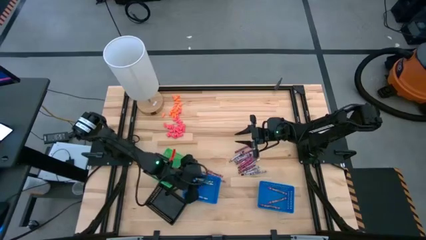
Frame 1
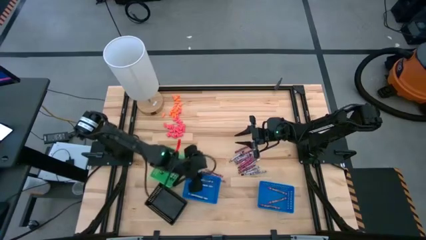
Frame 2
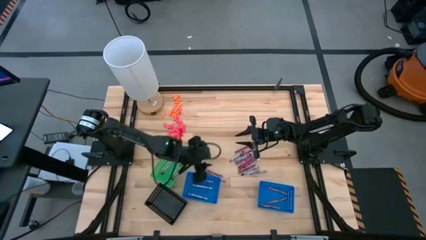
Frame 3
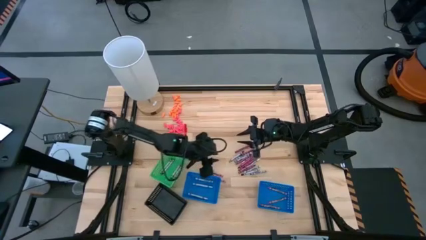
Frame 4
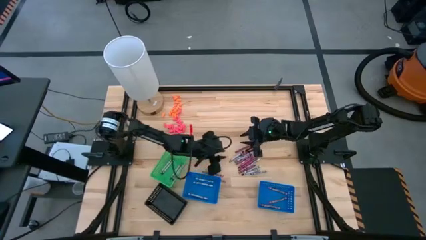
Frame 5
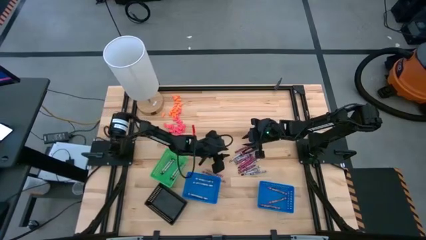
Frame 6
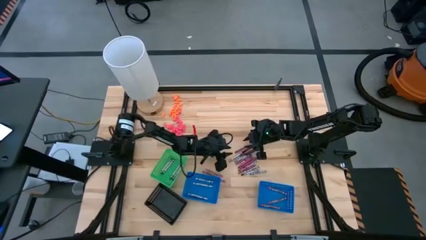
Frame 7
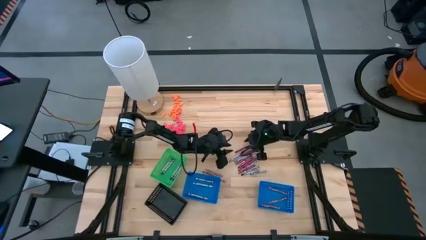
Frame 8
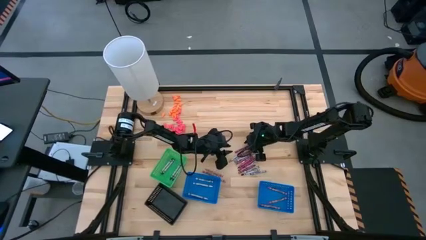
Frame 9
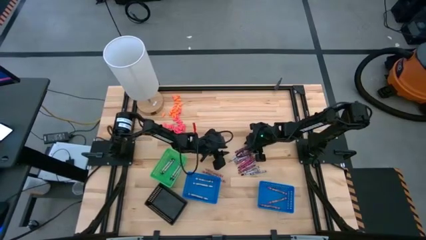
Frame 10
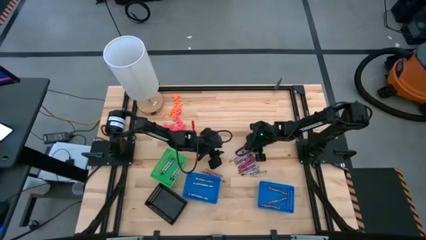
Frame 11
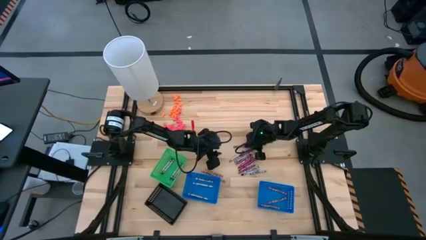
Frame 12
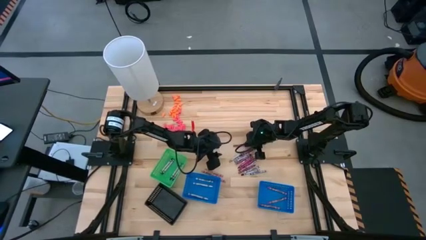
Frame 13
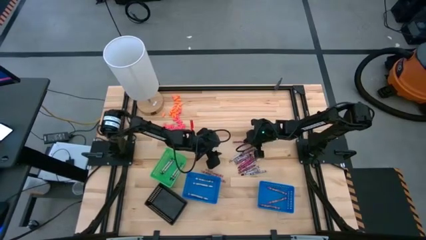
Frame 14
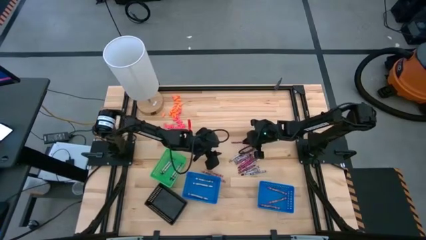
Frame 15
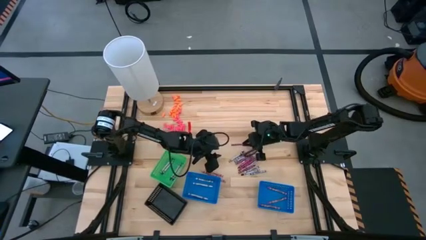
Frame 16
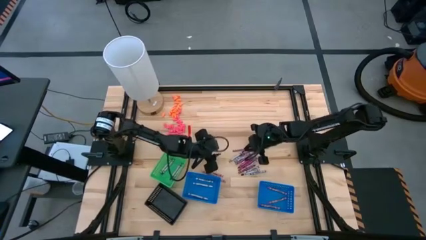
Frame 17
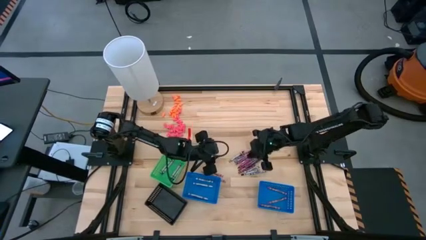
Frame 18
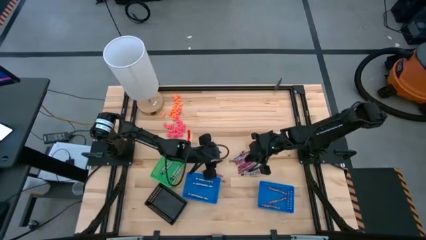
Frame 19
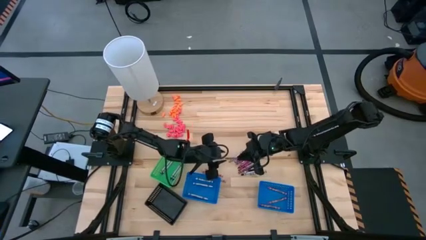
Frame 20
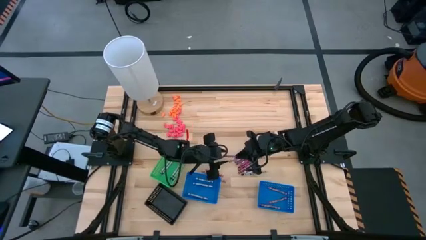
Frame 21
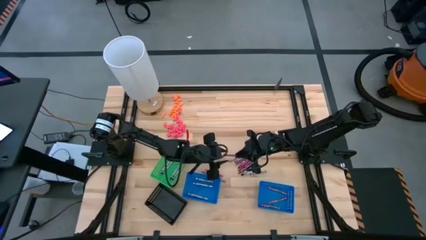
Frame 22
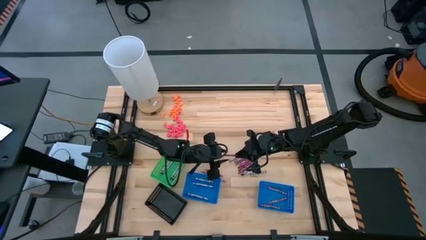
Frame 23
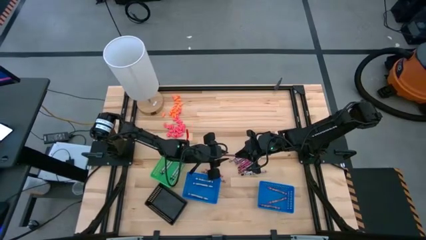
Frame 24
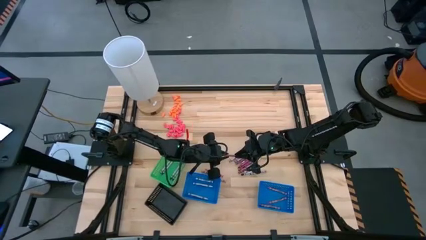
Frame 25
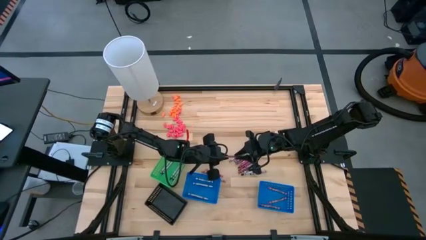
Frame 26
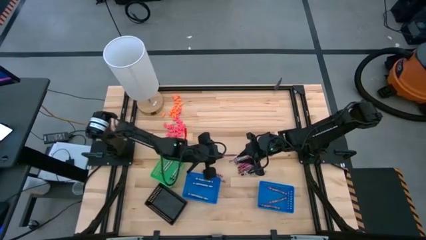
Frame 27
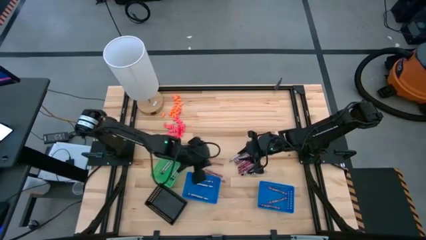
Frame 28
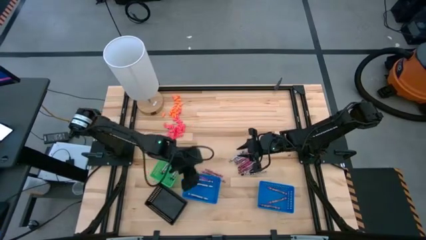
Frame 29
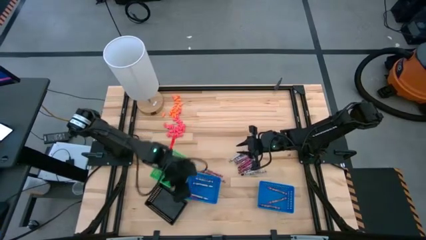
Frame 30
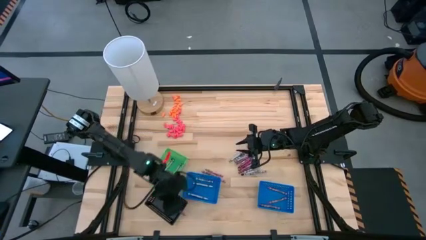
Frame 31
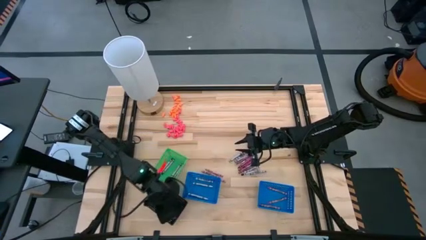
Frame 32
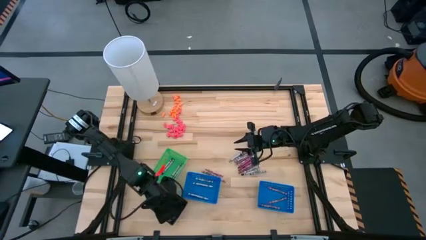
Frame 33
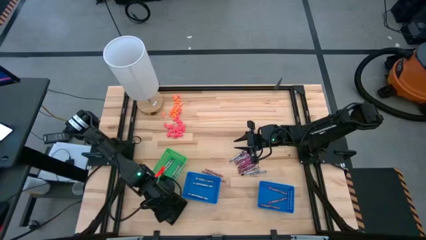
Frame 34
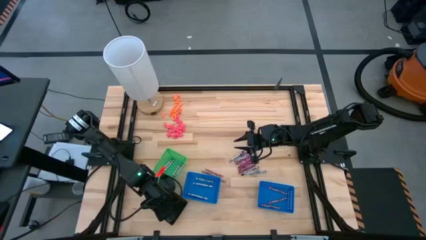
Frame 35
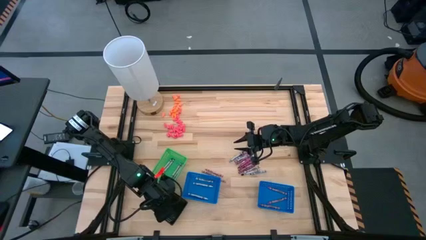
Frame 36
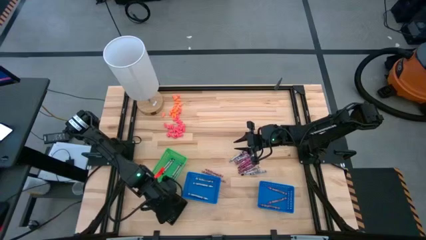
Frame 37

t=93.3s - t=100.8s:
Task: Sort crayons
Put the red crayon into the black basket

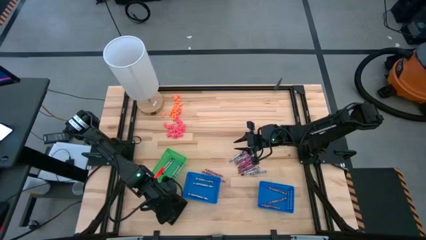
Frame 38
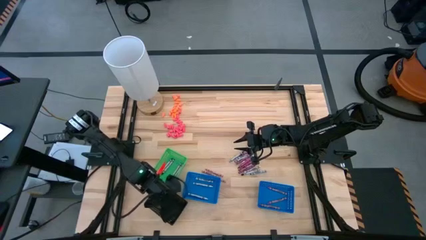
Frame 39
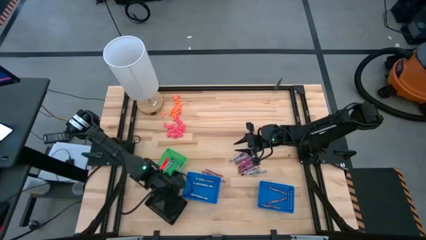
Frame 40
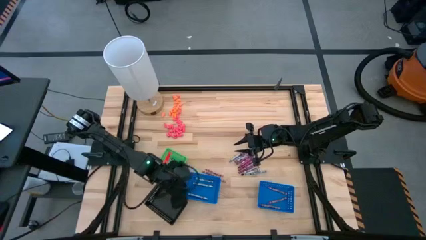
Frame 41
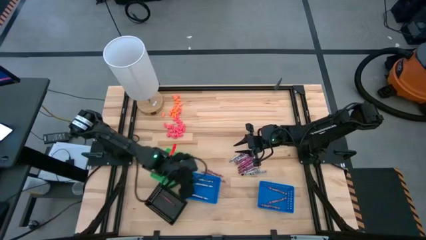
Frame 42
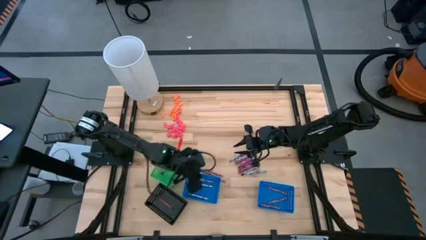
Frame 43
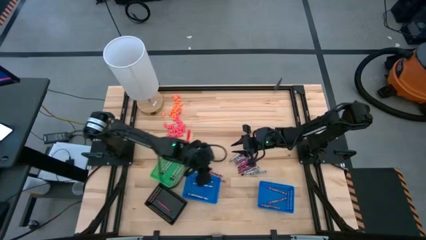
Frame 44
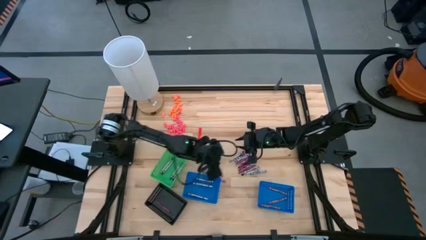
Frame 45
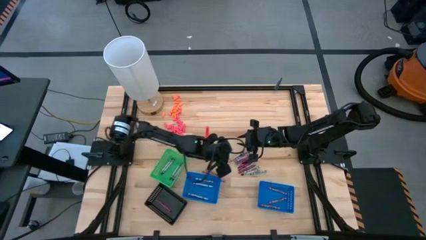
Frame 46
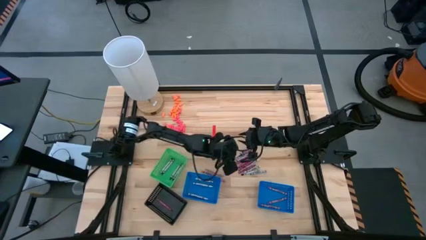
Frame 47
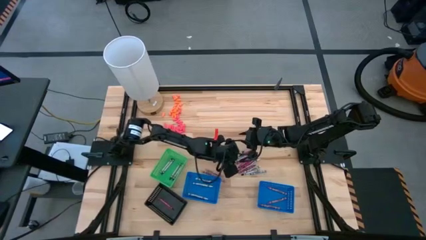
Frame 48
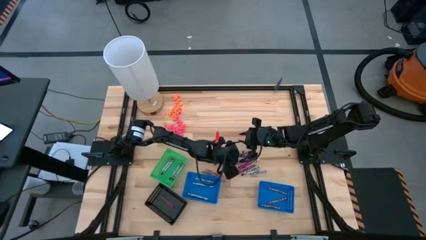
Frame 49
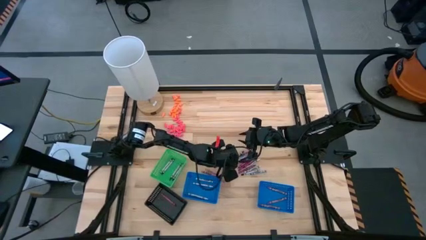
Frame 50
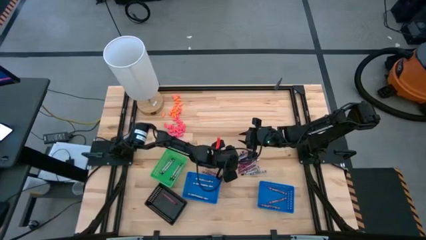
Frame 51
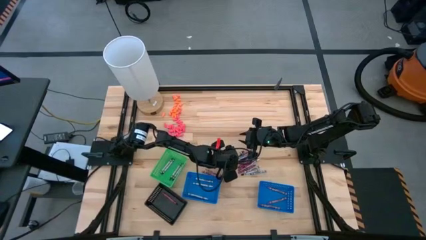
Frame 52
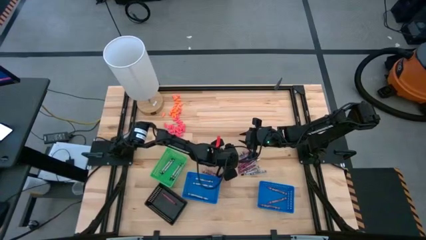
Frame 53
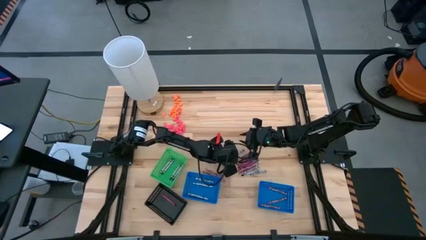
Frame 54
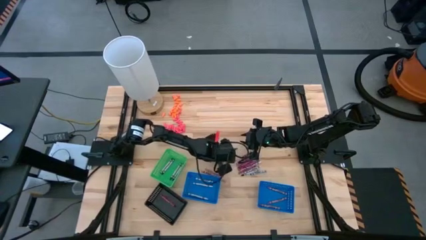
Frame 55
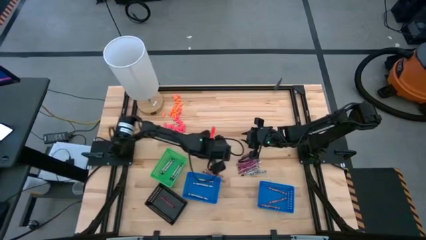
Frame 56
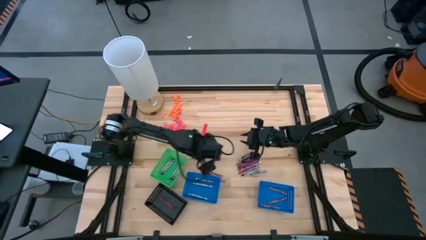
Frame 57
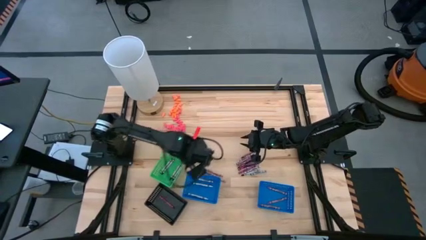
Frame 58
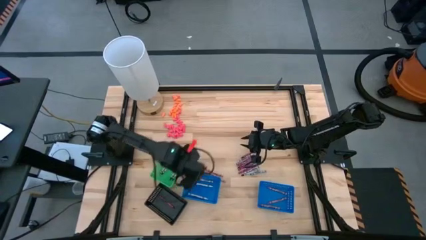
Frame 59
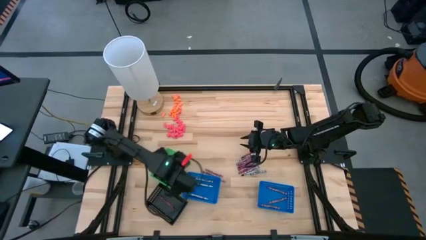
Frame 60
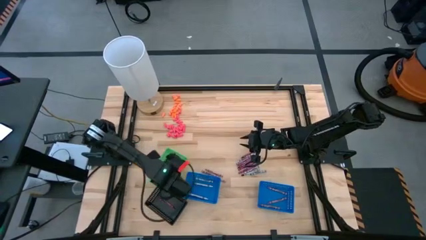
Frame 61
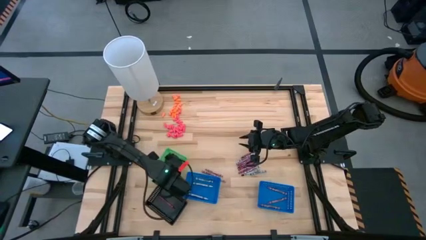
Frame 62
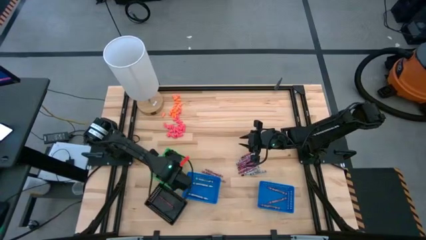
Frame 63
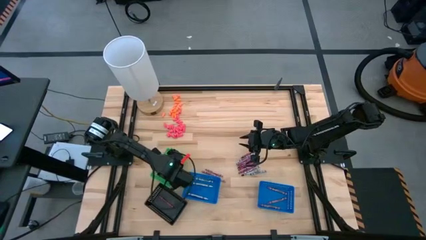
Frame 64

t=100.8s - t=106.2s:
Put the black crayon into the green basket
